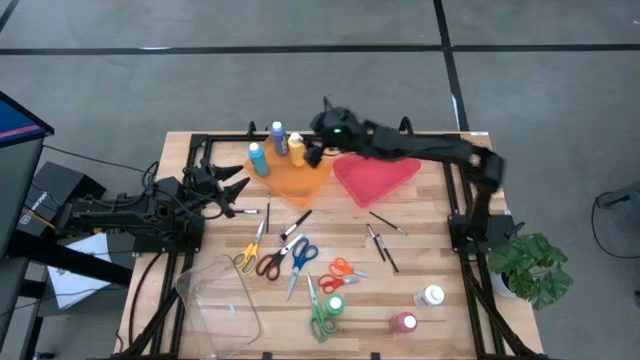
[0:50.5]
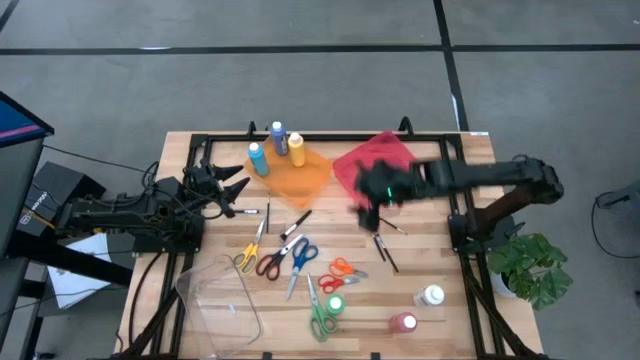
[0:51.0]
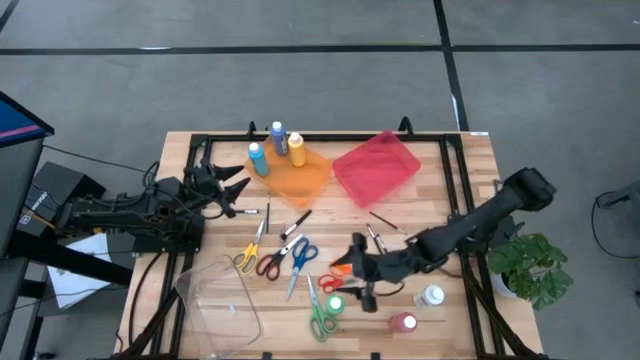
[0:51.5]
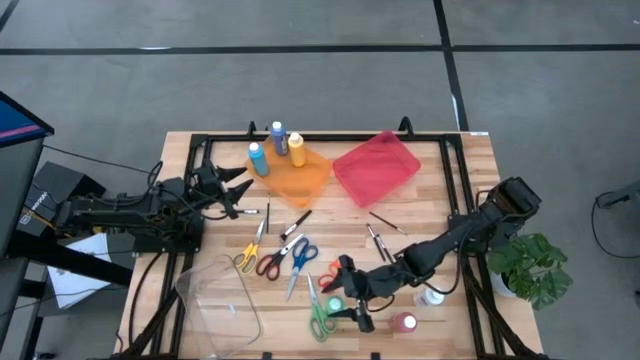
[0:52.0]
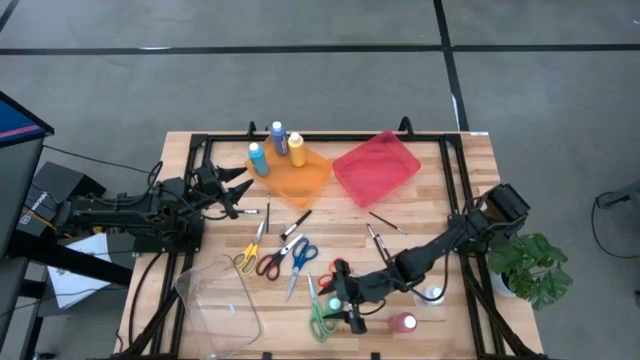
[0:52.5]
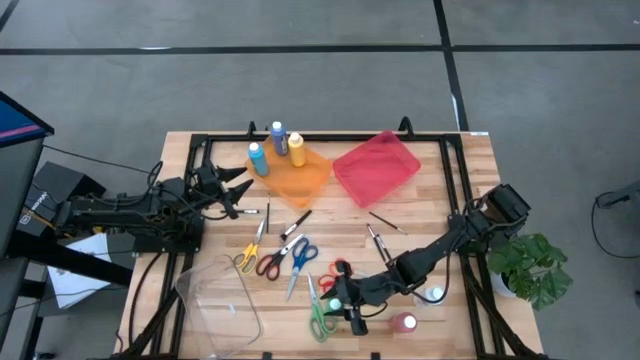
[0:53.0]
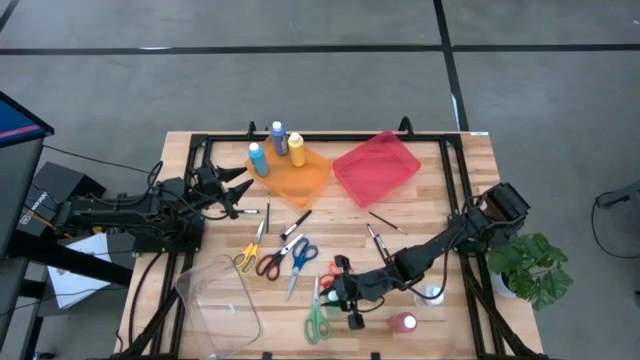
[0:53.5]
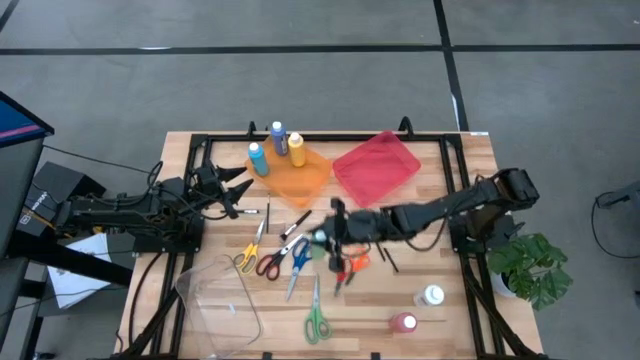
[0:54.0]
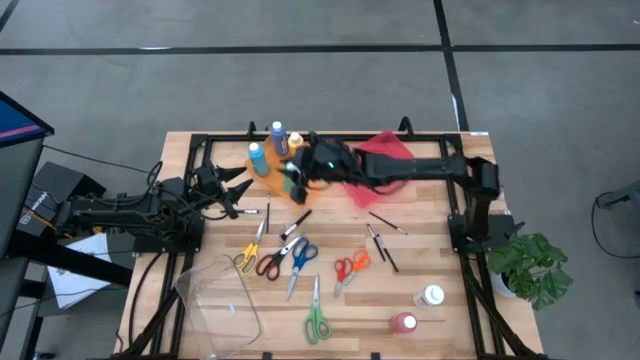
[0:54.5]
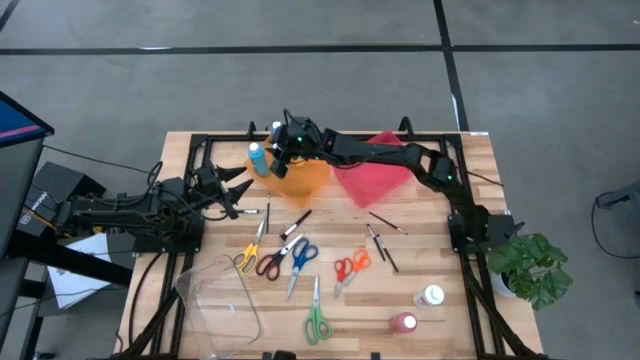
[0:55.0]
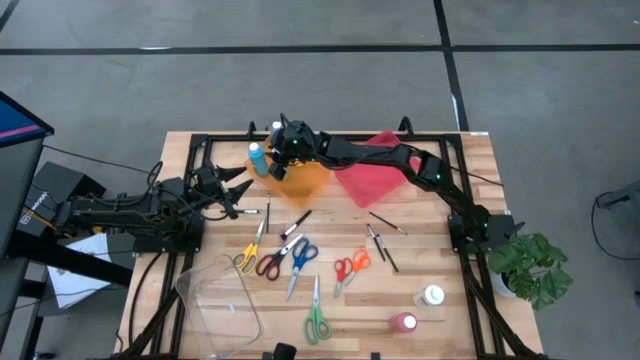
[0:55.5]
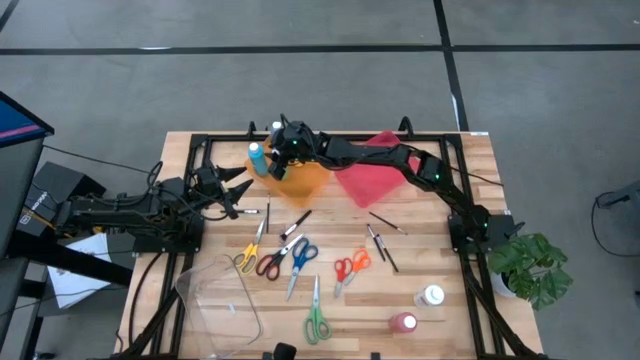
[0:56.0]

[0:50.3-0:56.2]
Task: Pick & Place Paint Supplies
Put the green paint bottle into the orange bin

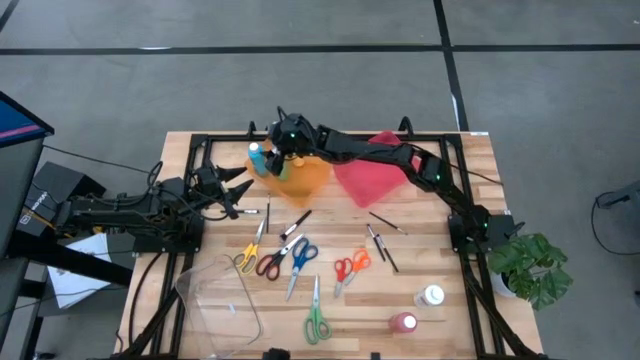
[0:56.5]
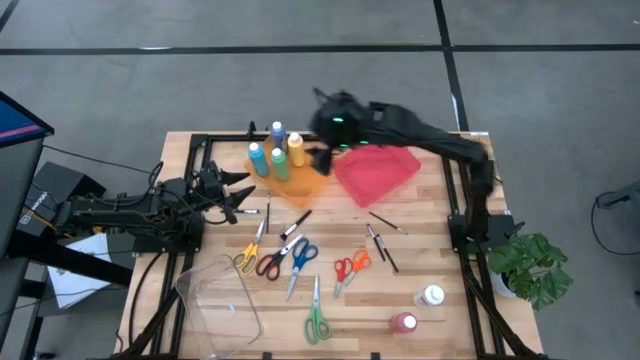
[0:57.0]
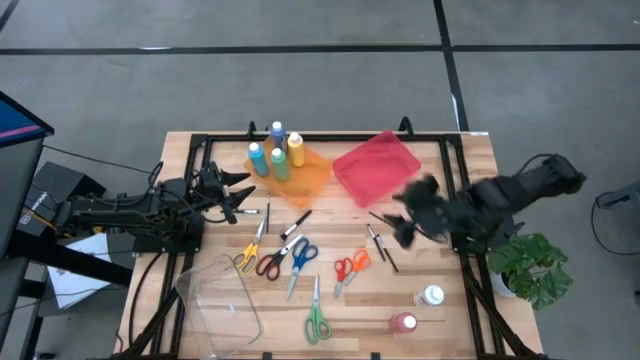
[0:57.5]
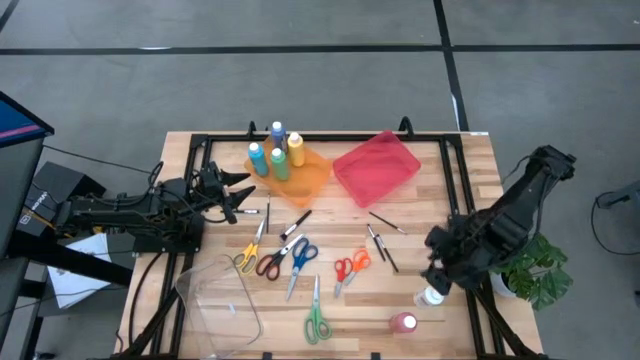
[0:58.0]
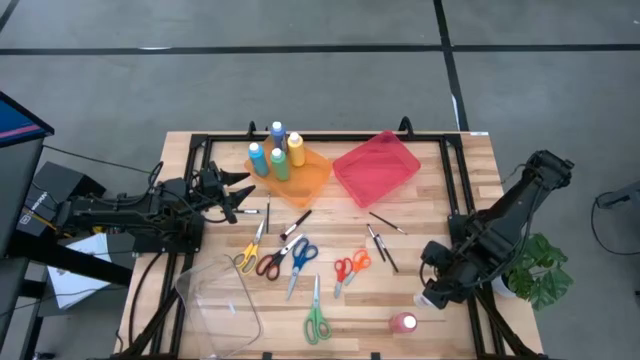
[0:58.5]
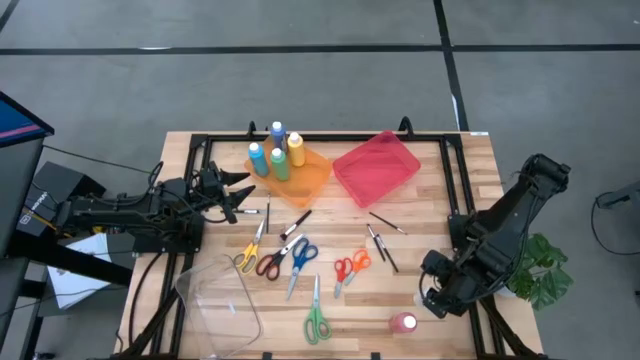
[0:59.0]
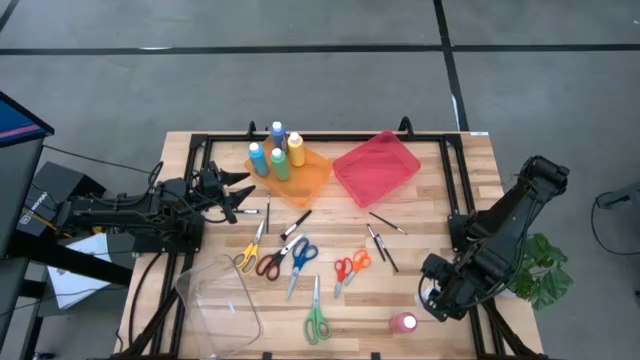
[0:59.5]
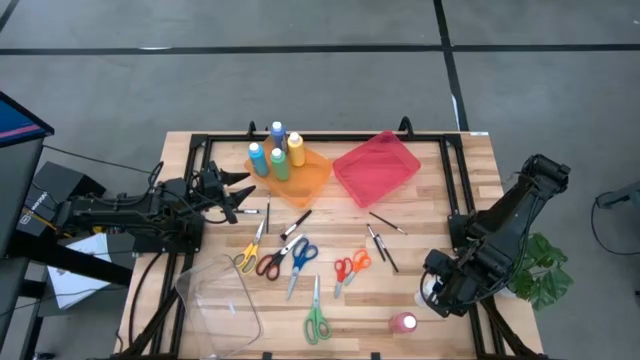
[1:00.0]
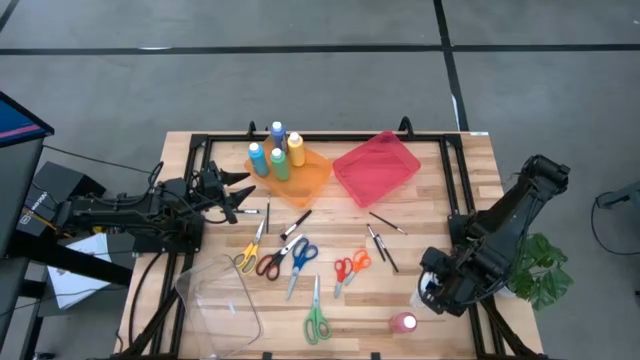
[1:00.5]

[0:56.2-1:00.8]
Put the white paint bottle into the orange bin

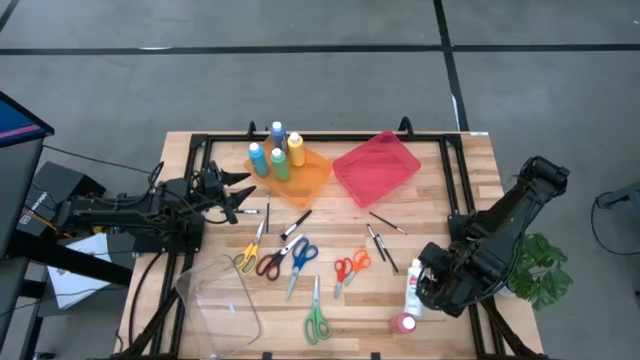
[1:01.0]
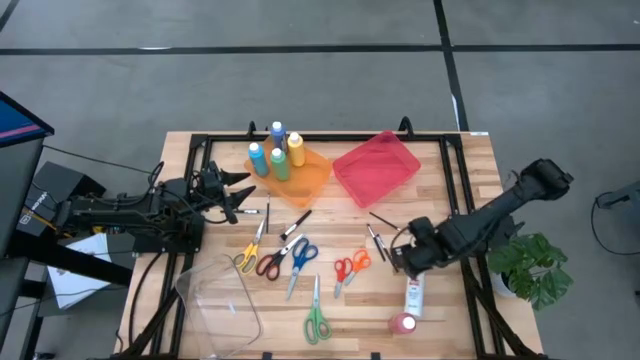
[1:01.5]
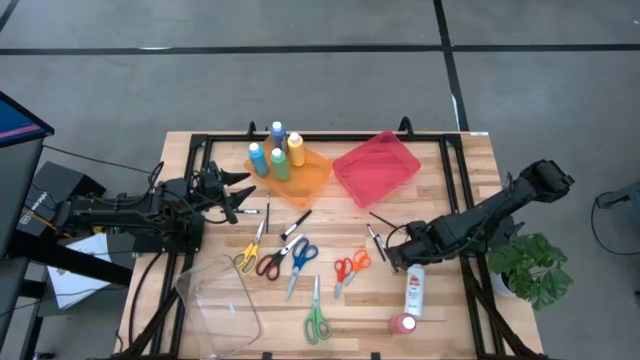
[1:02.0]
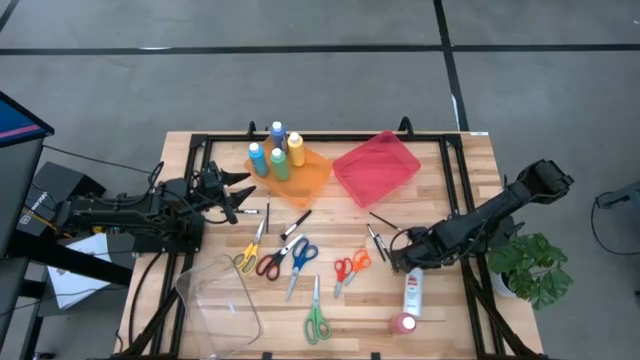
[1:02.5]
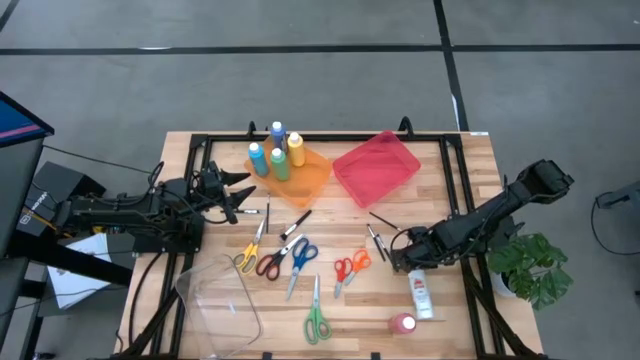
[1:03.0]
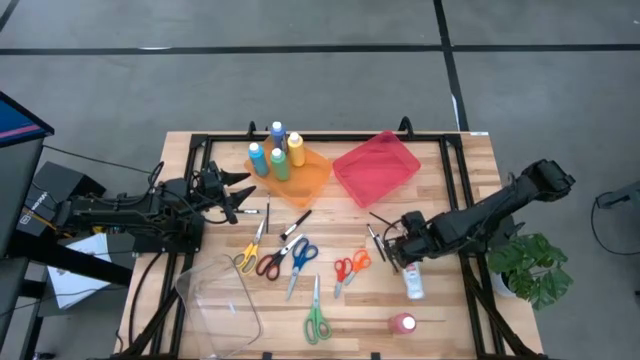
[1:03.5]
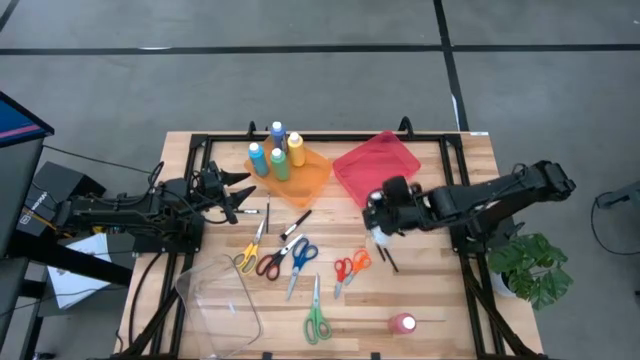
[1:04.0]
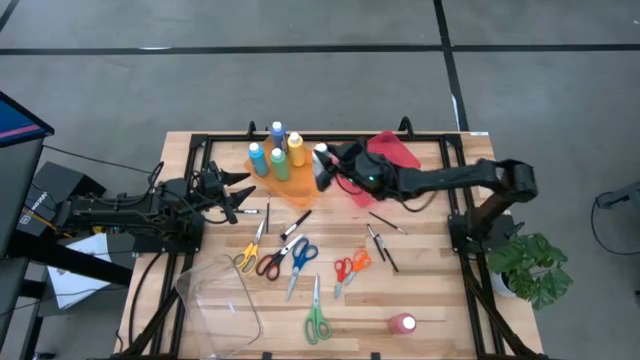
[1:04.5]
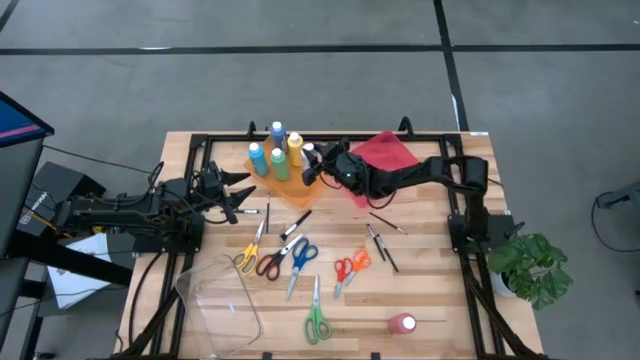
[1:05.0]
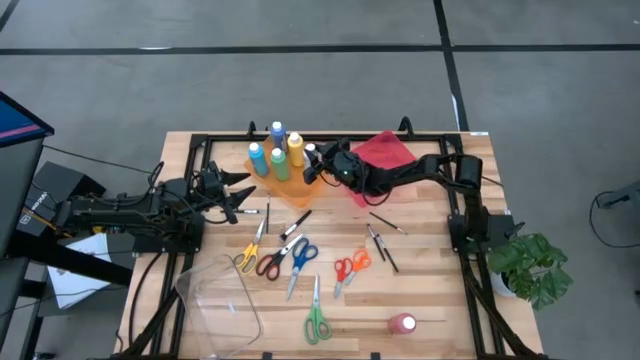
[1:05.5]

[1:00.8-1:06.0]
Put the white paint bottle into the orange bin

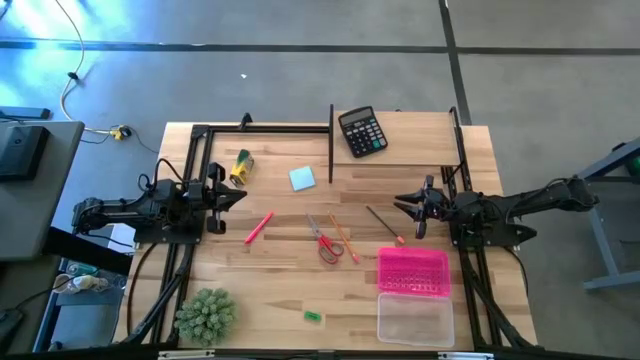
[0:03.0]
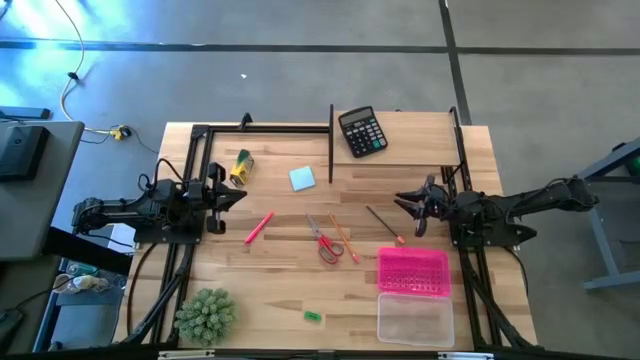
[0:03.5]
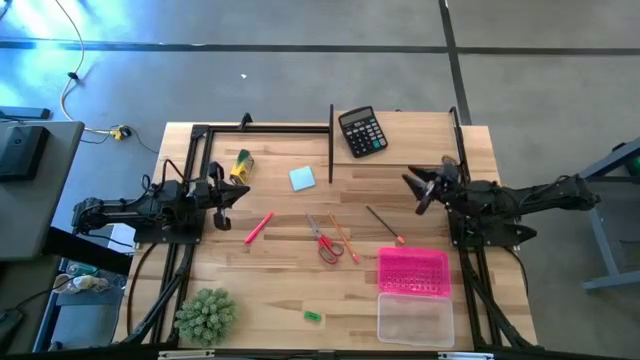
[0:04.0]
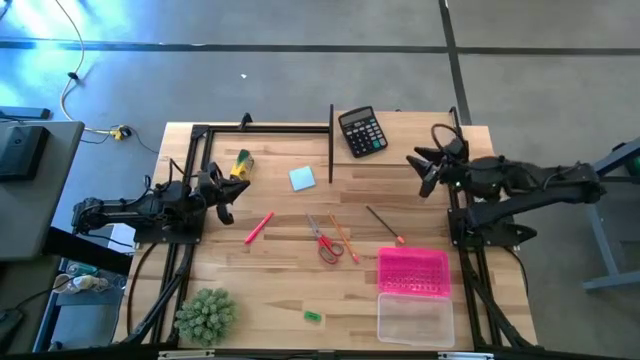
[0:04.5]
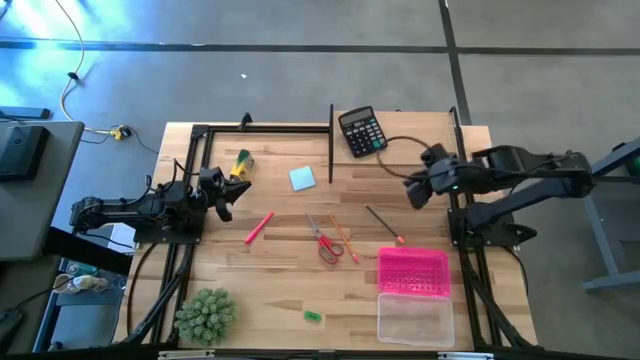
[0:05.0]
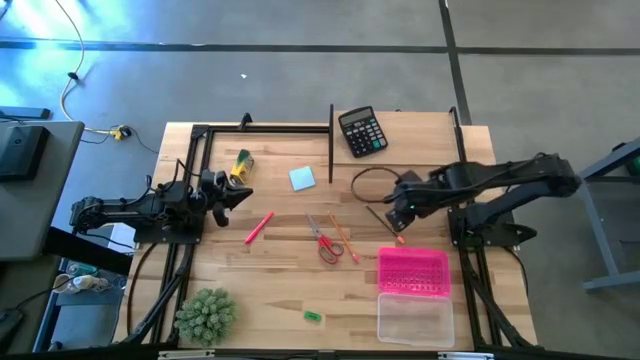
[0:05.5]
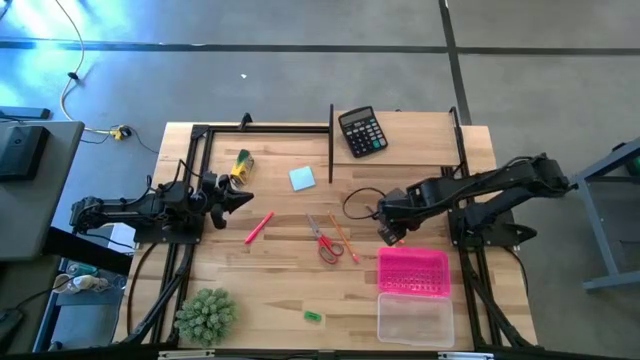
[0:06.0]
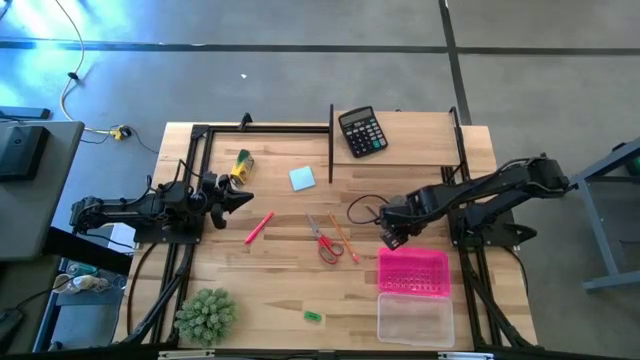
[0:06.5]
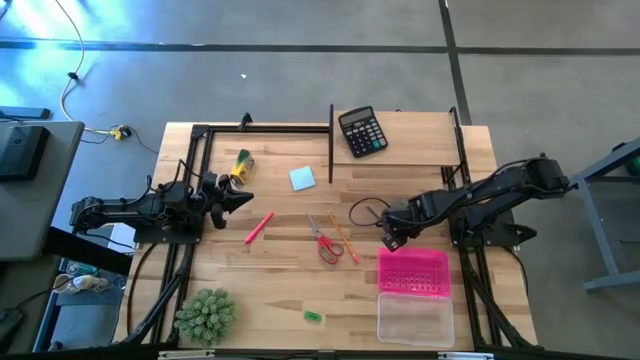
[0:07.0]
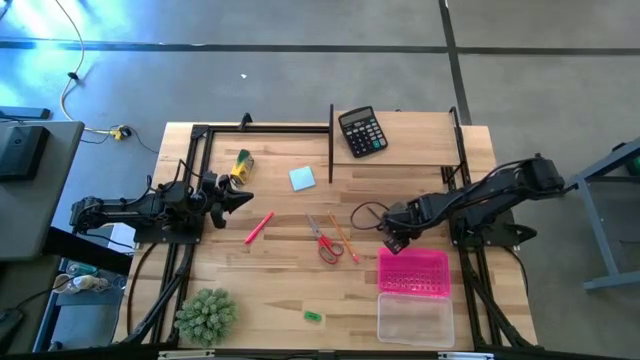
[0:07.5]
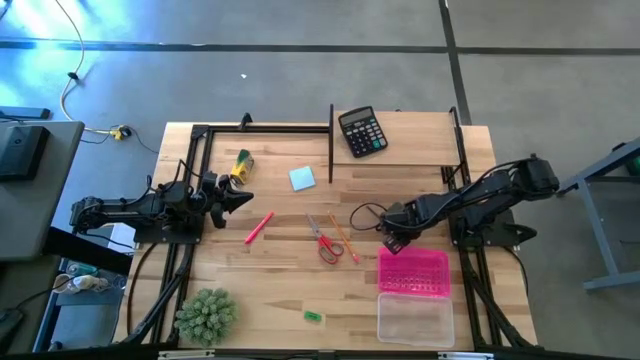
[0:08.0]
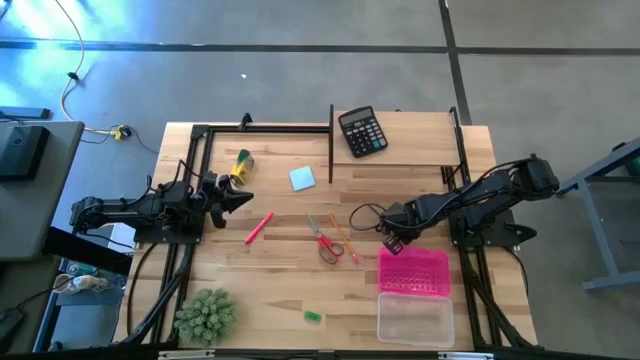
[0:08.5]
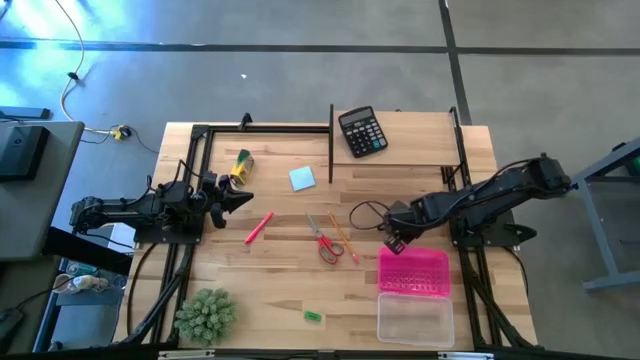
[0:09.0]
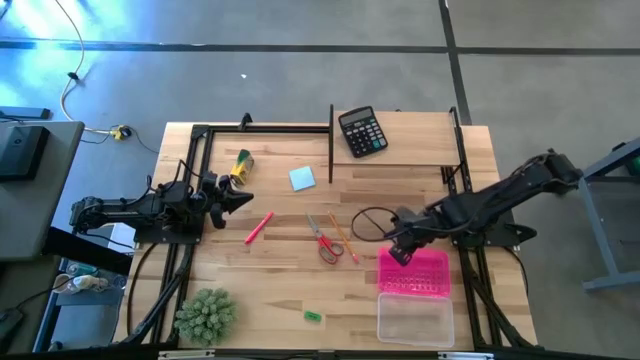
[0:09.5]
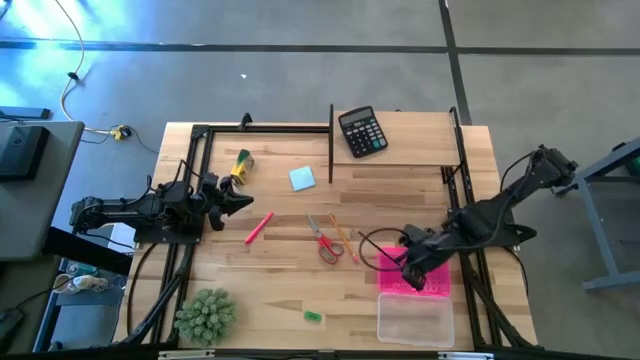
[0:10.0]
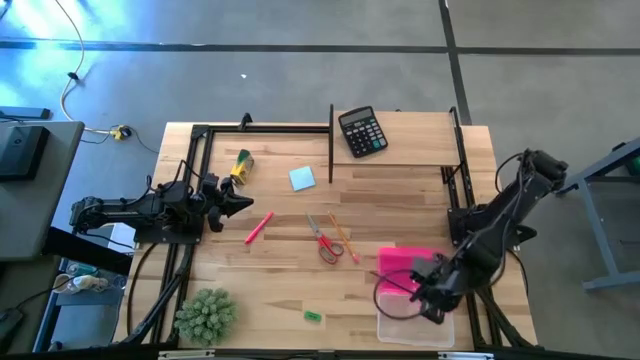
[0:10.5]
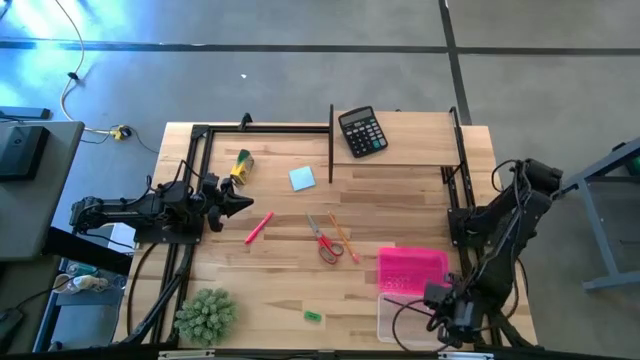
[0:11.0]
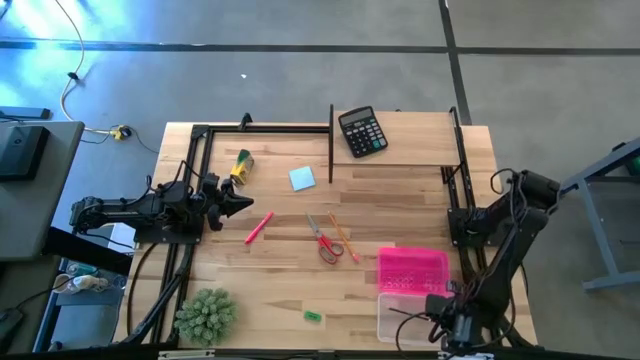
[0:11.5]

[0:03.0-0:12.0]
Task: Pack school essentials
Put the black pencil into the supply box
